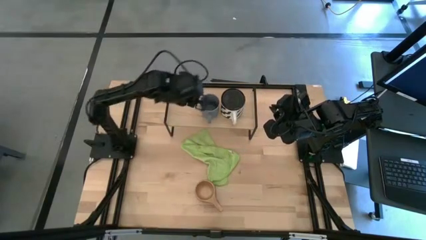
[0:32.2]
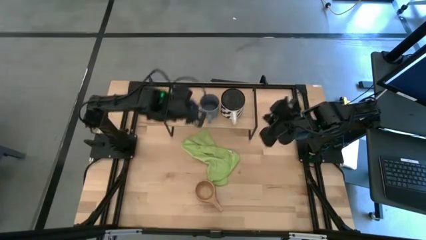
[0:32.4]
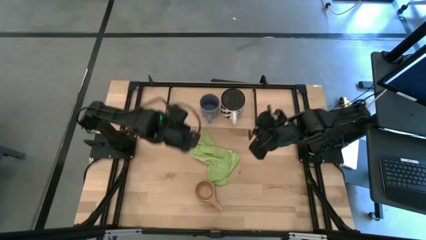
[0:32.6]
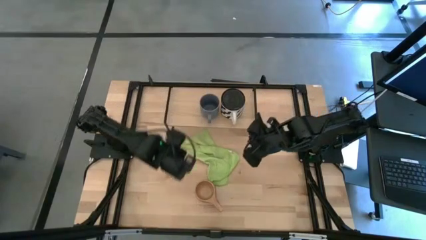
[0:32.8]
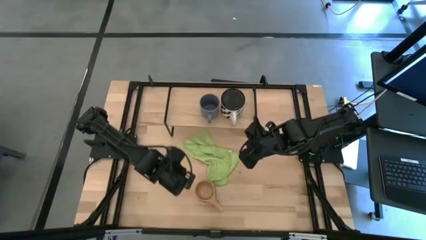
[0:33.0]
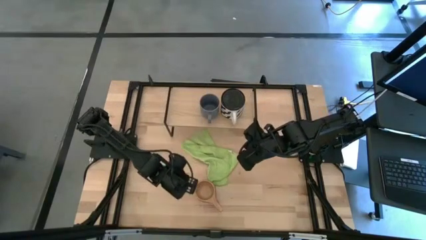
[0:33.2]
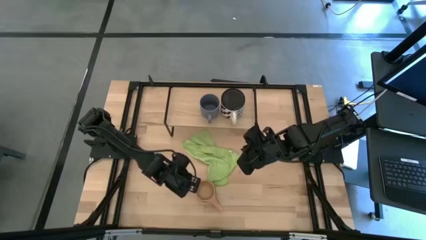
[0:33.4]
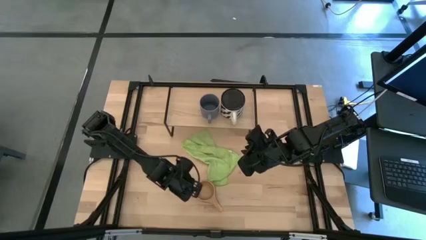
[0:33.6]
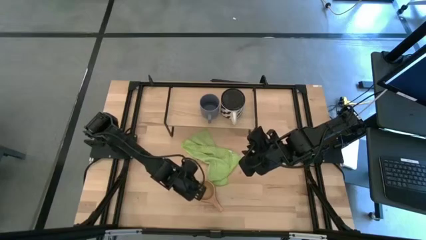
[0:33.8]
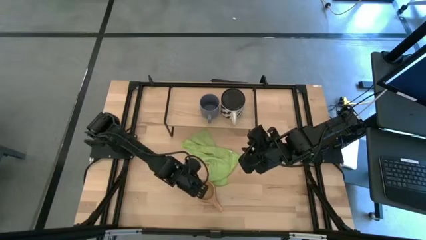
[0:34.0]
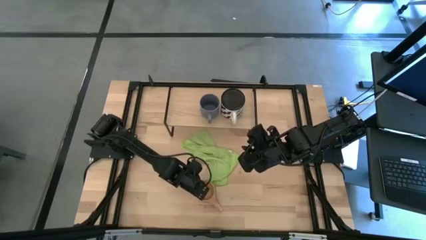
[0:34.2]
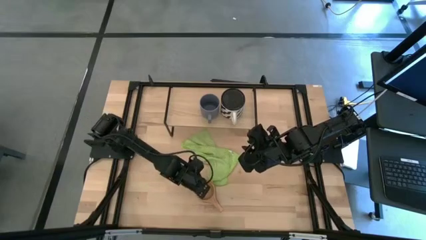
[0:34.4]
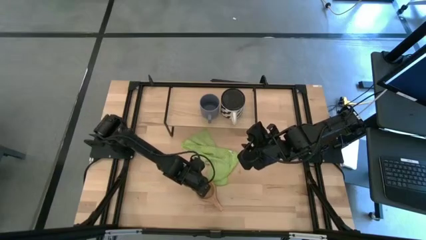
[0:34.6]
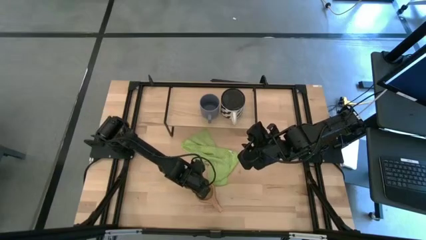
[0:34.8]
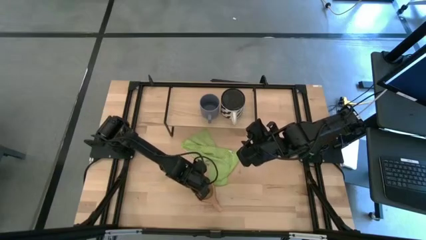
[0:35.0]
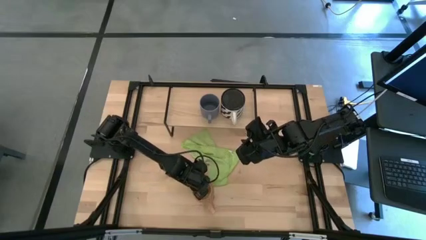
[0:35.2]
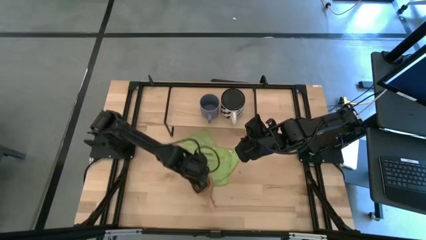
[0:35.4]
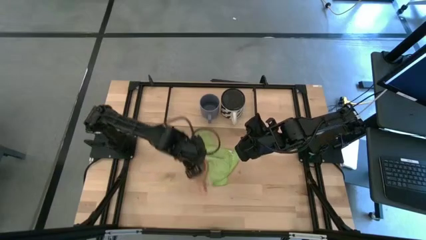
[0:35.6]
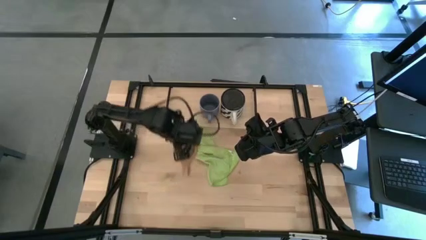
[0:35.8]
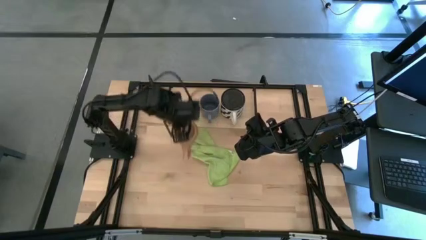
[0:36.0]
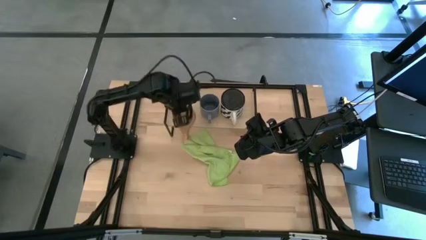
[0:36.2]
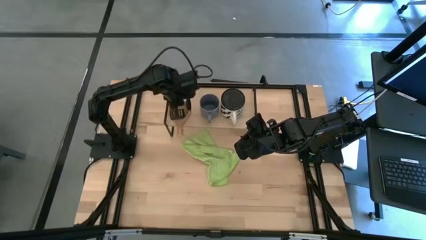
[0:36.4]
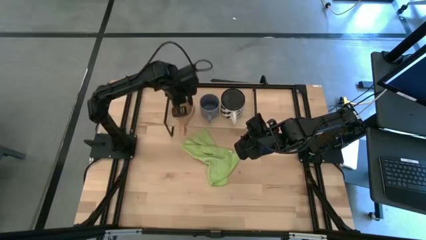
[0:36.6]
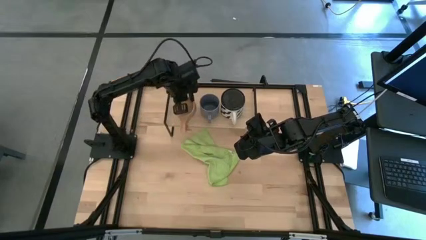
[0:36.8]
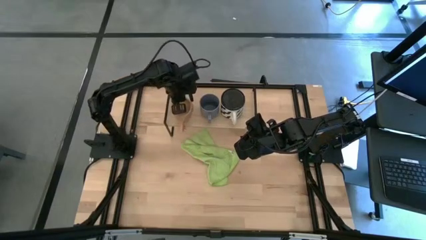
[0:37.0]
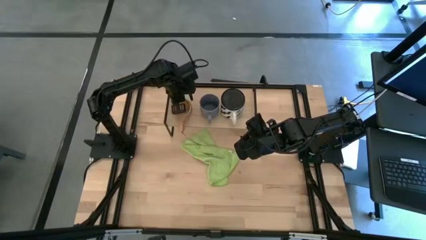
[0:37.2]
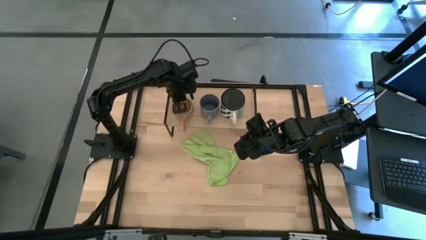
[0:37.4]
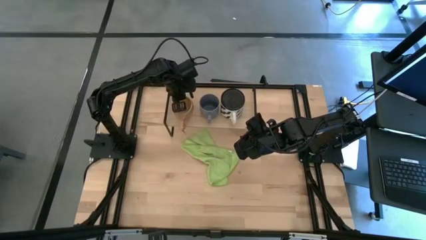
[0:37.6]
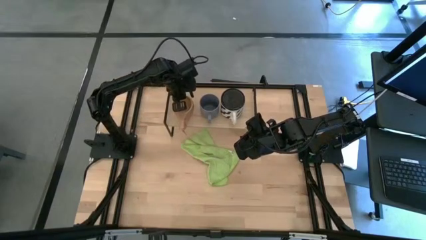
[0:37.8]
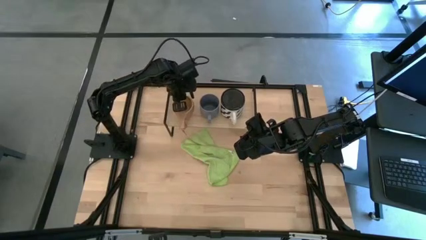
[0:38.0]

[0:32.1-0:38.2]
Task: Stack small to large cups/mugs on shelf
Put the brown mug on the shelf

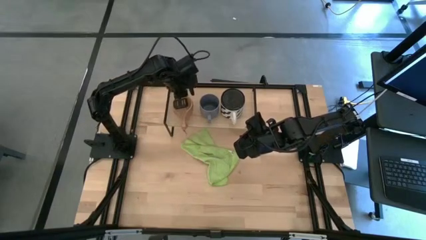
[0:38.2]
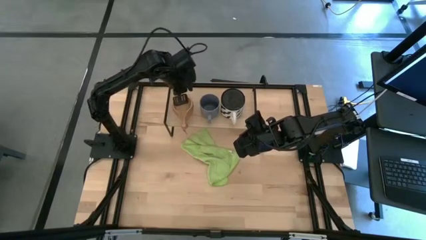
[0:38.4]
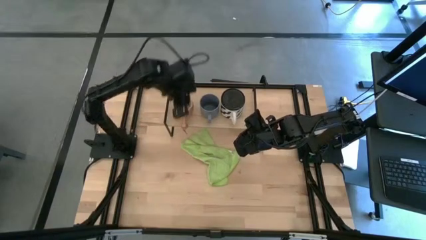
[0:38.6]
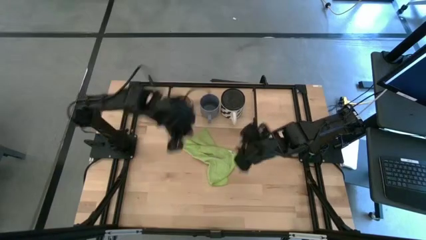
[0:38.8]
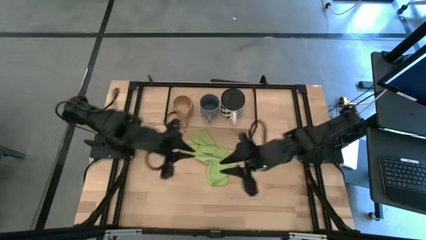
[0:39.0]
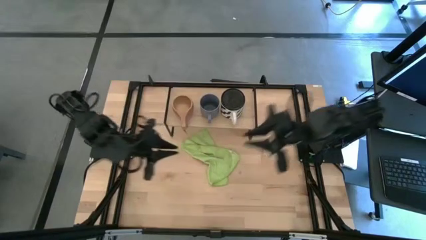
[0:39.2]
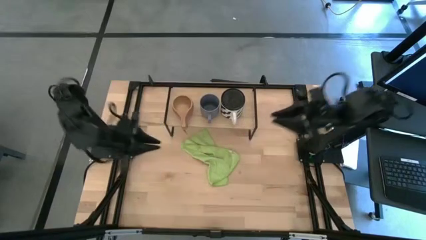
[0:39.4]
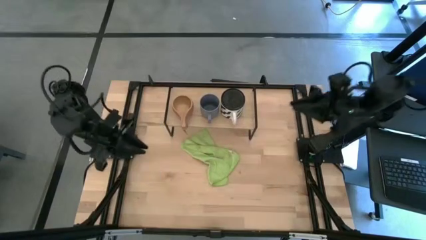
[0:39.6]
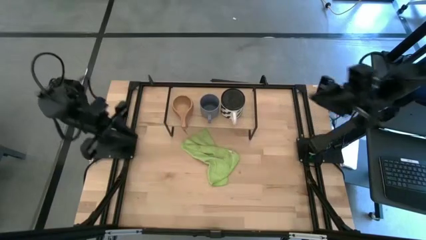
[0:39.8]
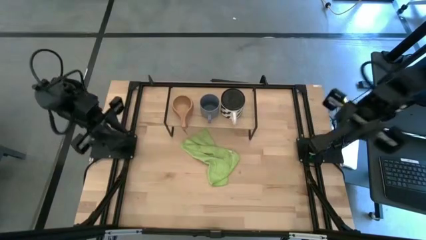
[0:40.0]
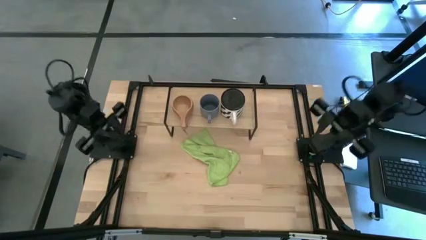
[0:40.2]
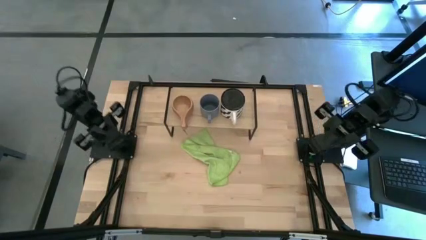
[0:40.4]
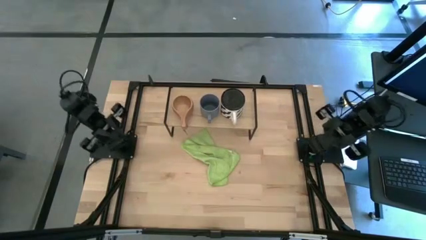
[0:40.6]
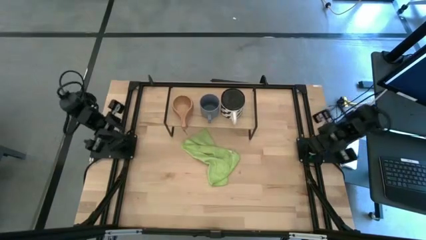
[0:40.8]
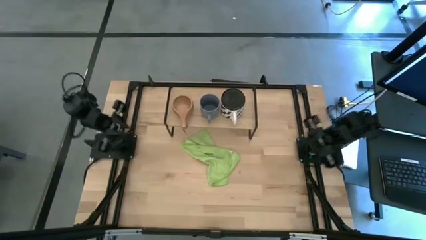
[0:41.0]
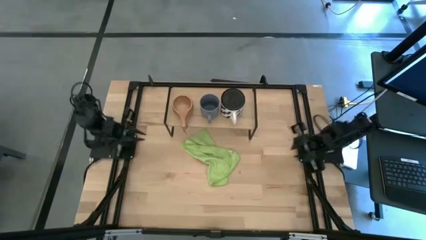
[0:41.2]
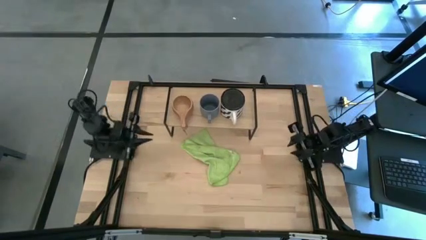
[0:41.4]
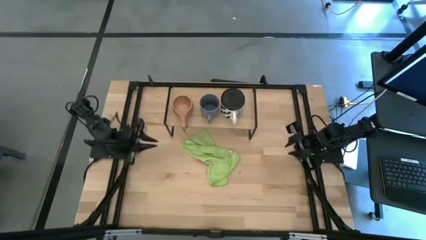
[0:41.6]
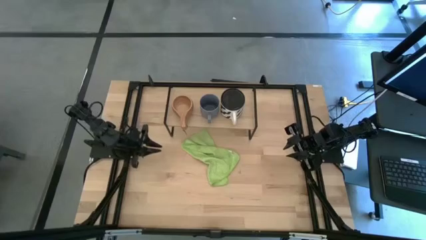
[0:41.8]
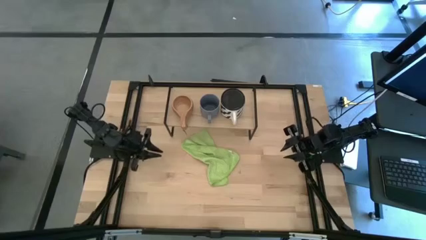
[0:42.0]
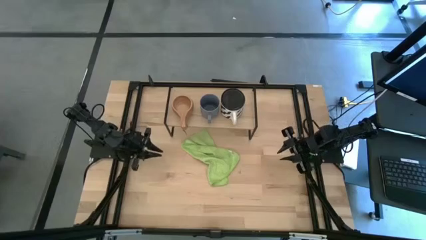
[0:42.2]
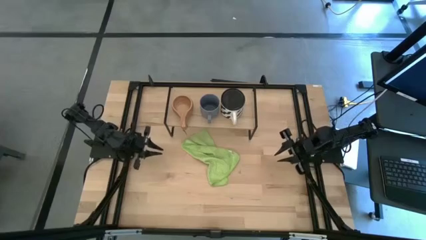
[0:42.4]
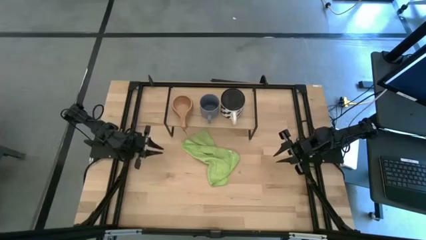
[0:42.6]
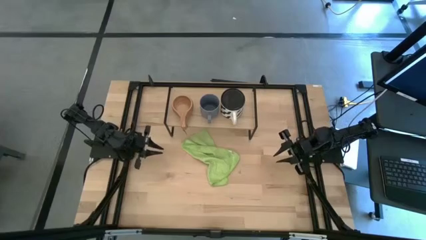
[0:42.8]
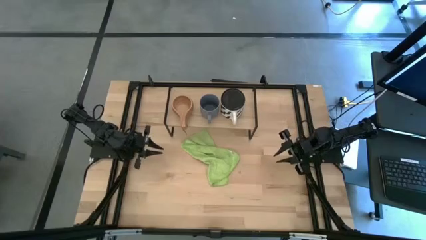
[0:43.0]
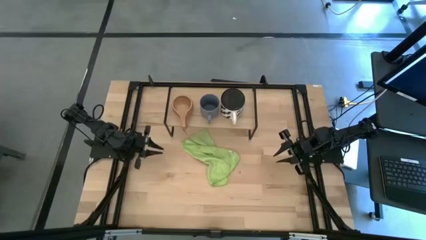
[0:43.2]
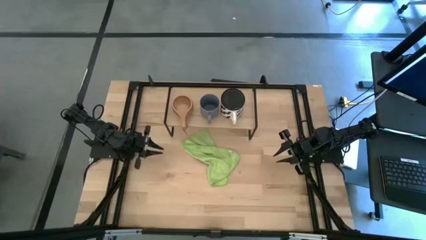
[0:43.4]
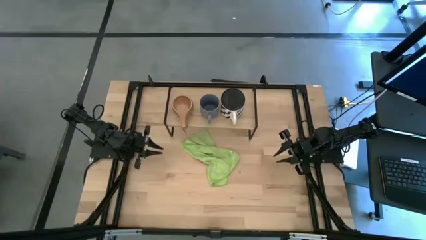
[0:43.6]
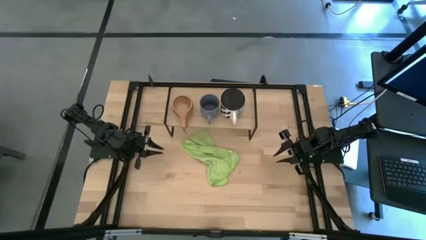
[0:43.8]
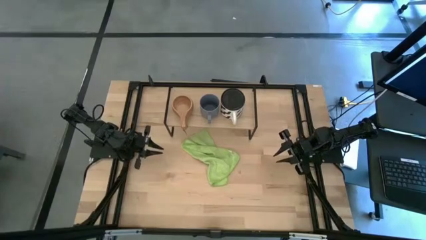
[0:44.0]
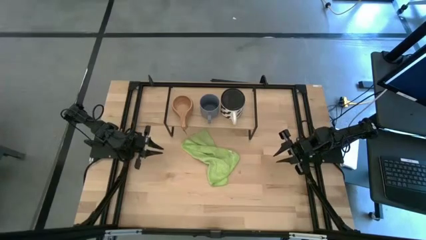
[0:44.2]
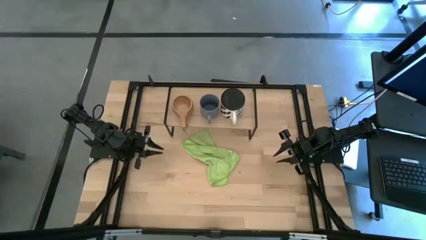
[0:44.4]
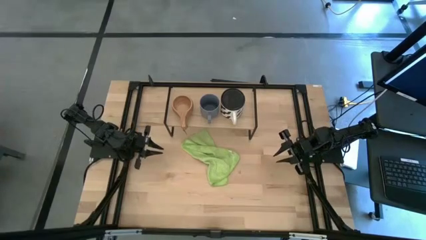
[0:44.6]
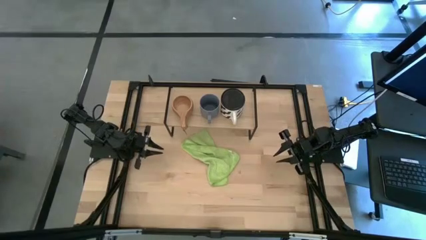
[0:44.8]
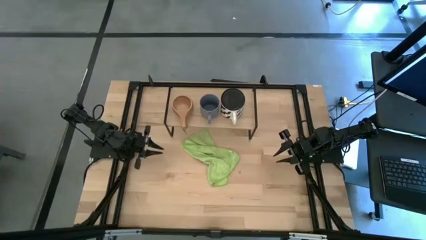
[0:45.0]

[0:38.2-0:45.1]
Return to Home Position
